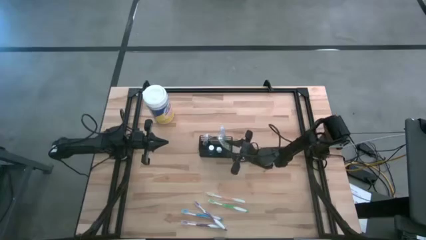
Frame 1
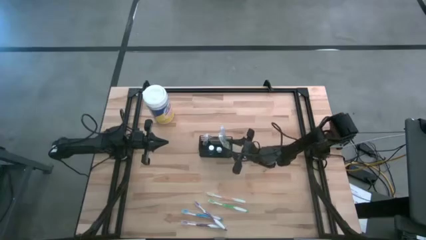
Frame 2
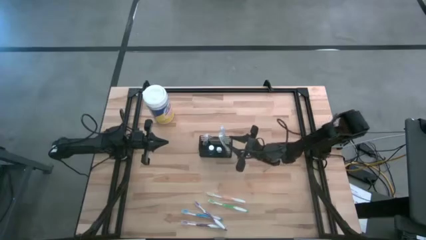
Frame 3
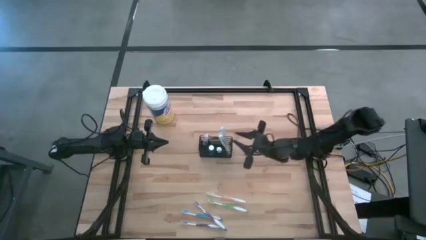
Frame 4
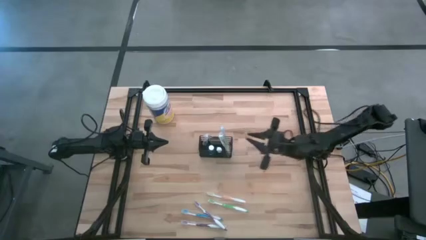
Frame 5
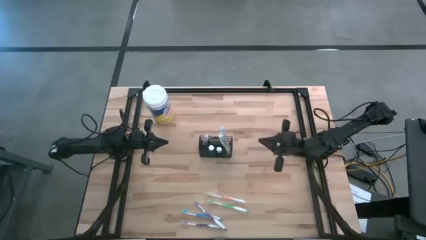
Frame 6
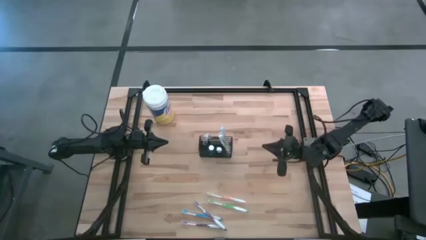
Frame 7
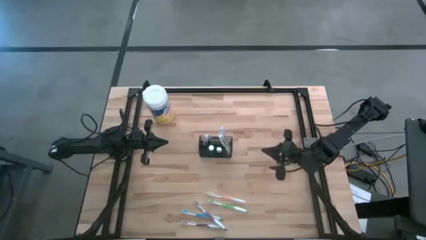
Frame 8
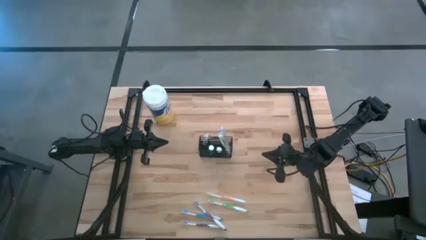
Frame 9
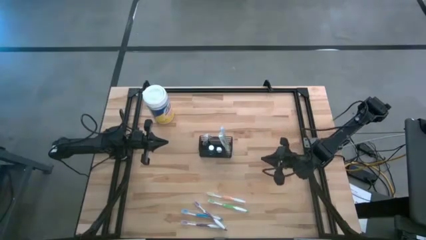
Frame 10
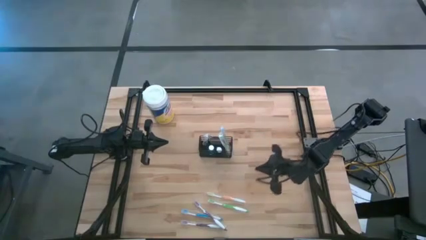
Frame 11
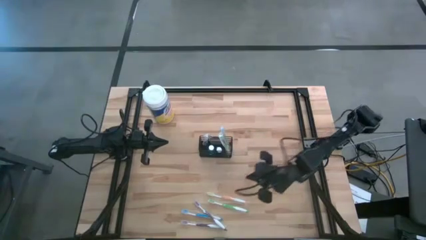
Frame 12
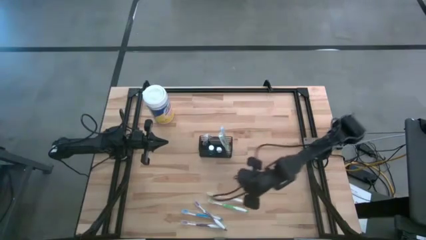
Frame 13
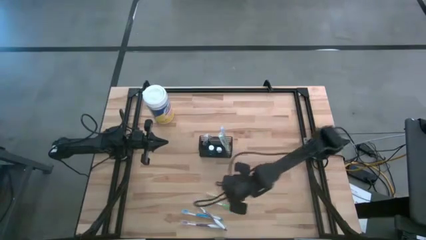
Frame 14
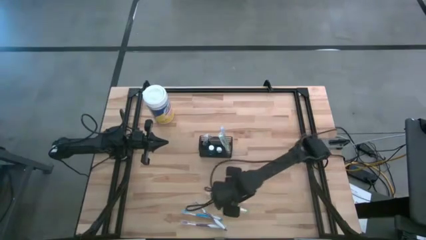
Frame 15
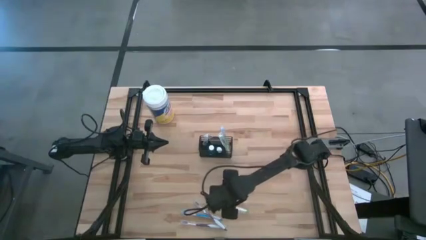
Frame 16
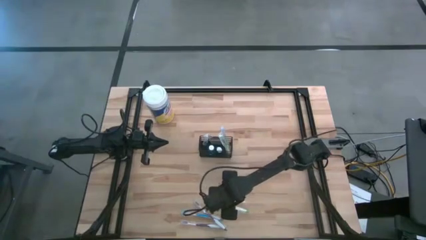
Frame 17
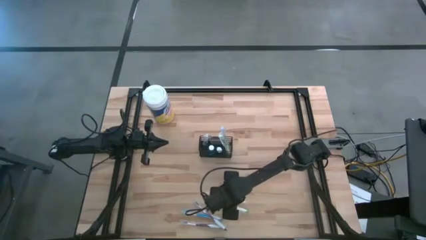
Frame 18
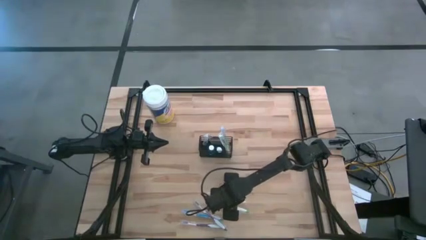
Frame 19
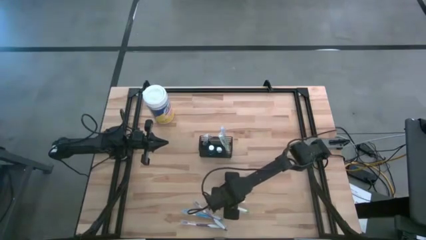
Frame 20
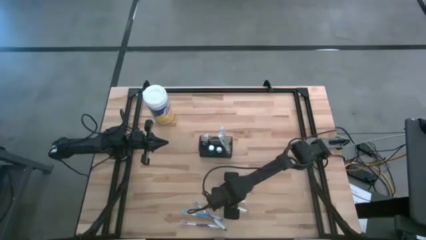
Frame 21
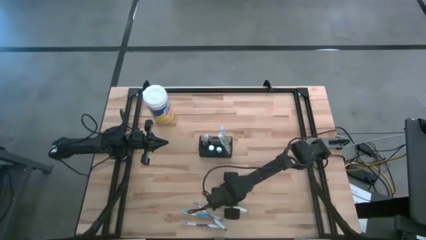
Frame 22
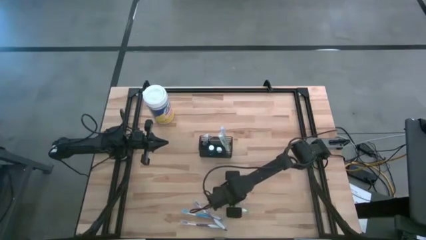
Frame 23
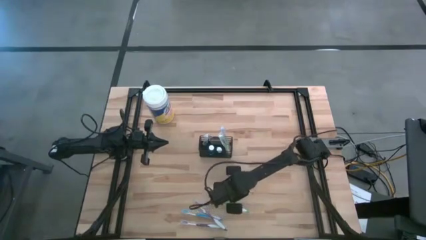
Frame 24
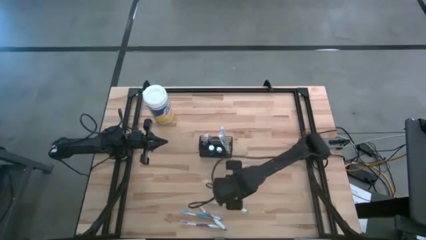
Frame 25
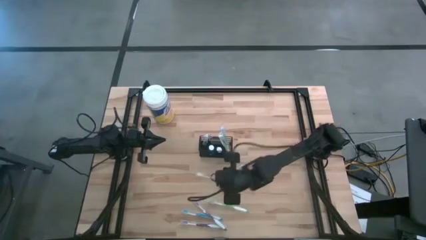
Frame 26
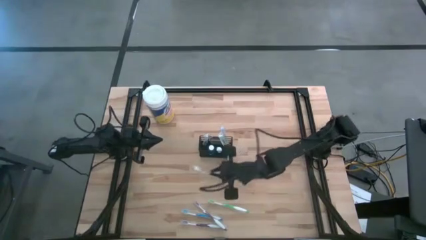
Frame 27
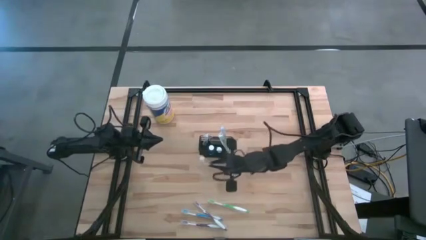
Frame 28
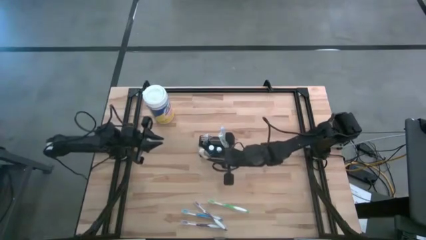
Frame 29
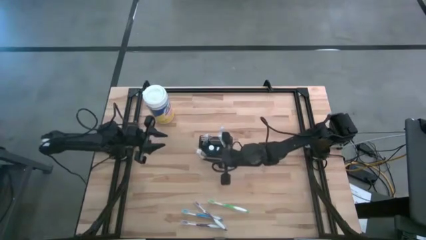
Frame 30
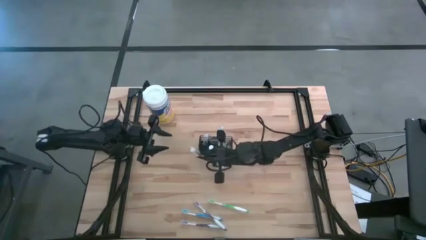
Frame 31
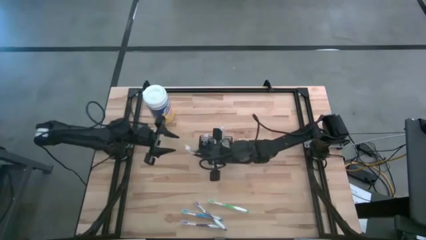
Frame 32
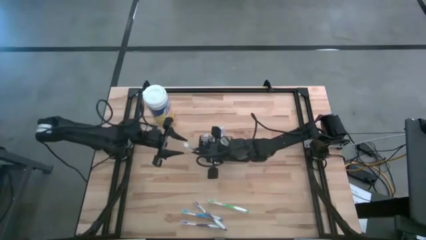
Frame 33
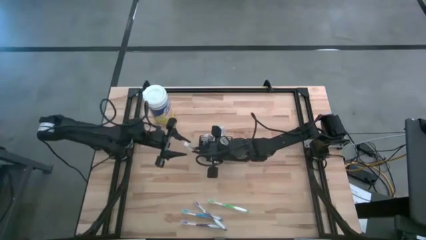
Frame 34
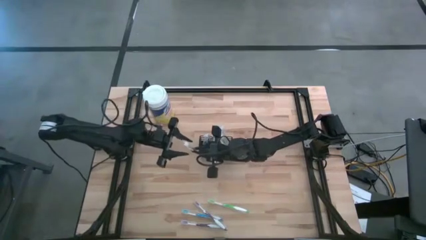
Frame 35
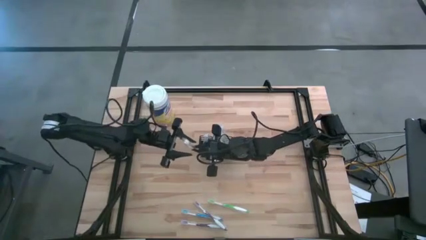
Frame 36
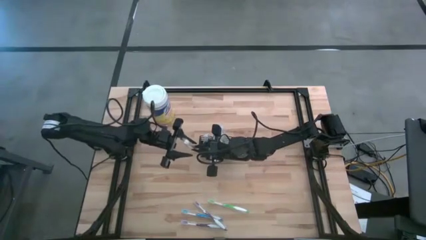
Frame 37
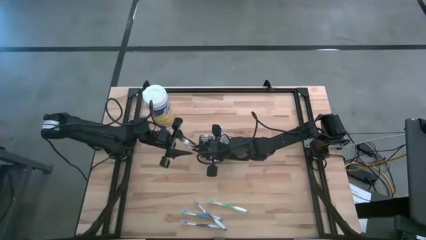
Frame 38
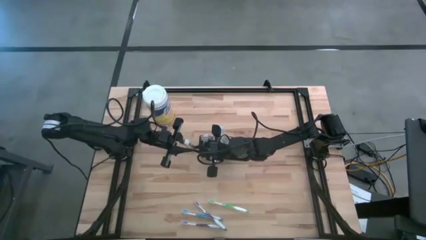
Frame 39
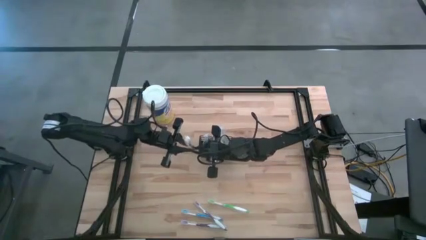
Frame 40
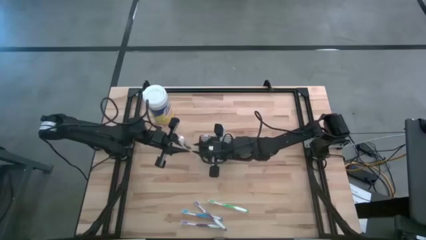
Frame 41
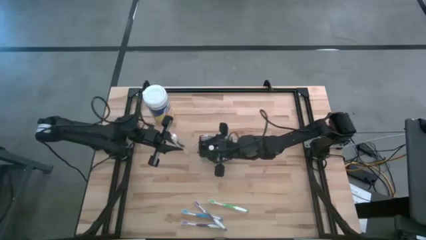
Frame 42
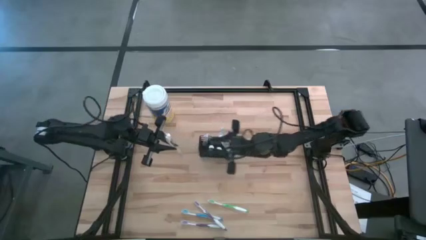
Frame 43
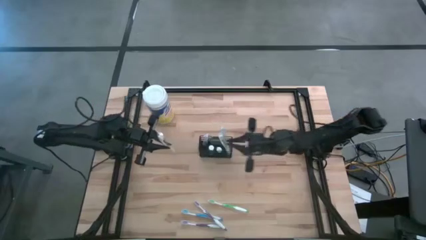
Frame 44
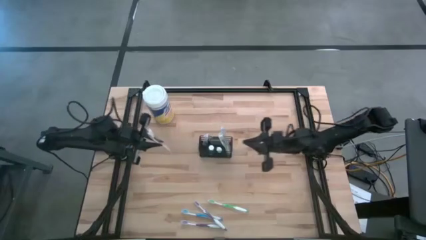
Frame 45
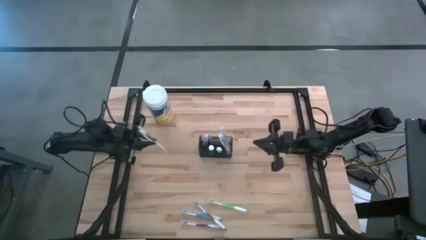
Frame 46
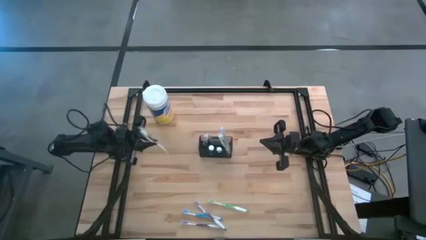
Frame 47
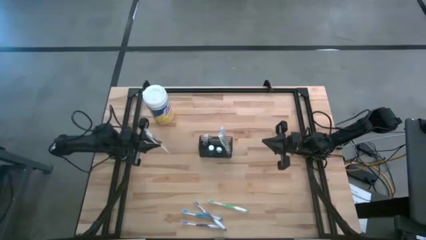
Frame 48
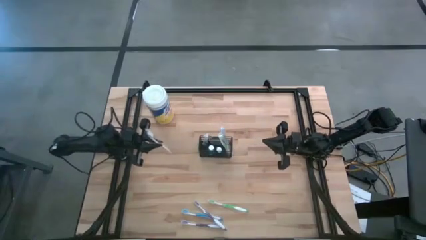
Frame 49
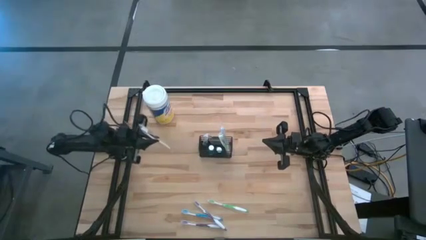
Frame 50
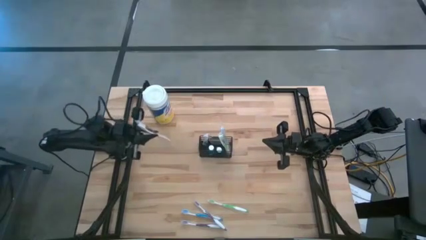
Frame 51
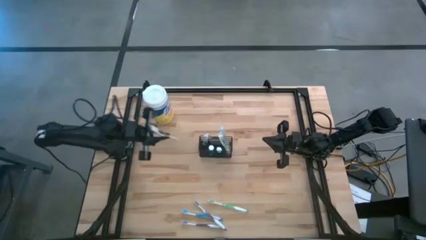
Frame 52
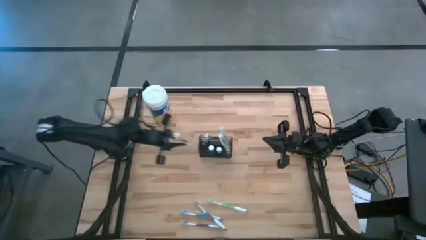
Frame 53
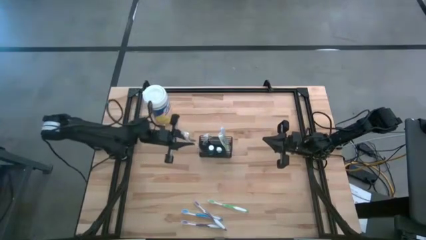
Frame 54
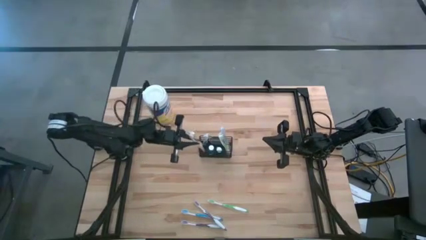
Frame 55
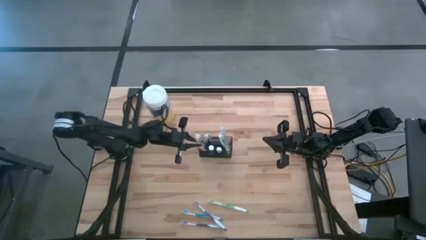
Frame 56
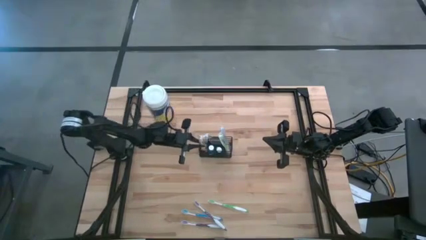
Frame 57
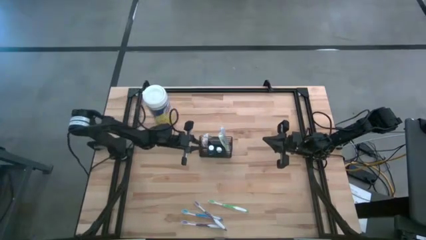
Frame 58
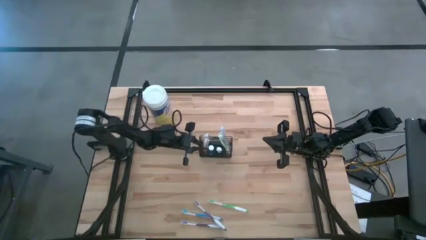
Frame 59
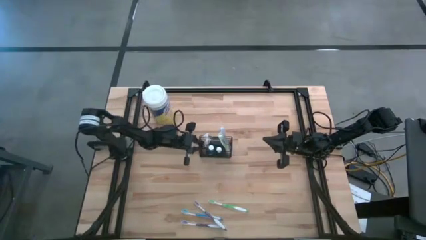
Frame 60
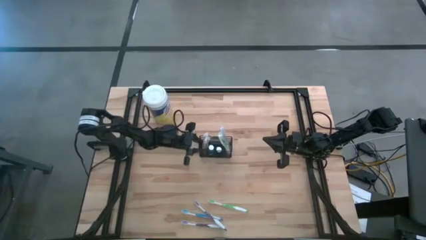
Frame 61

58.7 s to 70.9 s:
Task: Pick & Place toothbrushing station
Put the orange toothbrush into the wire organizer

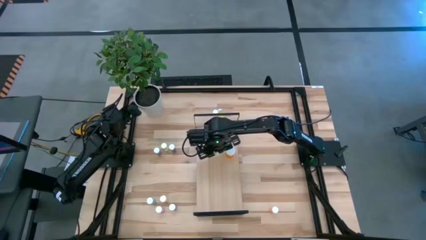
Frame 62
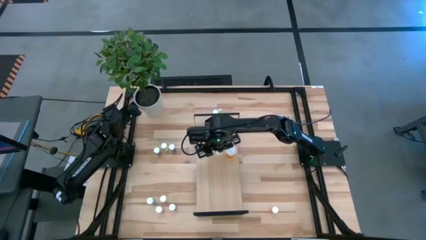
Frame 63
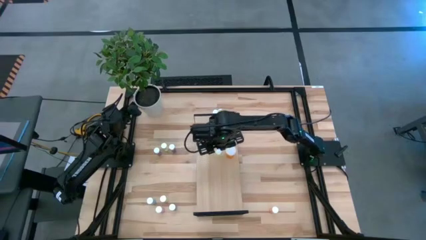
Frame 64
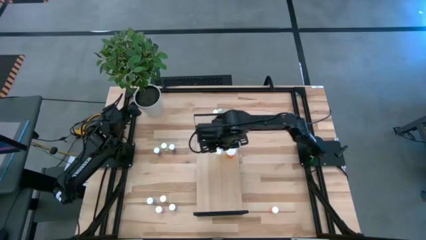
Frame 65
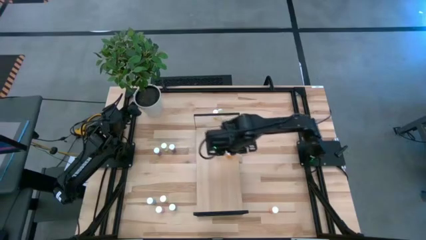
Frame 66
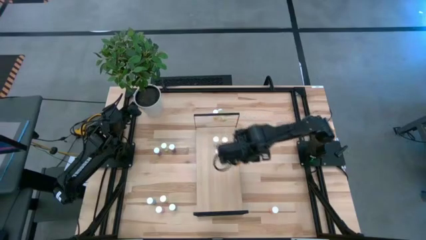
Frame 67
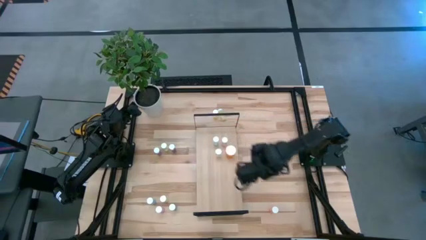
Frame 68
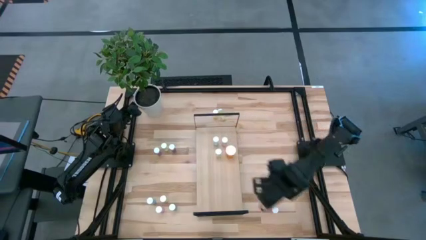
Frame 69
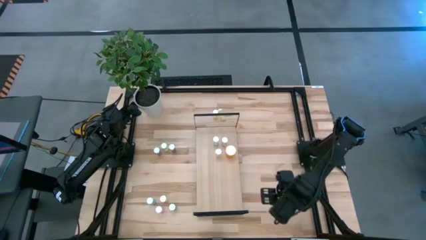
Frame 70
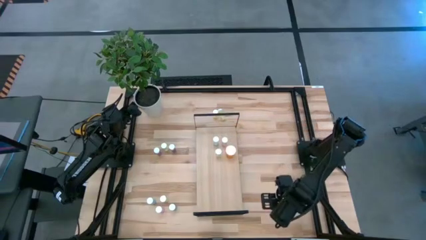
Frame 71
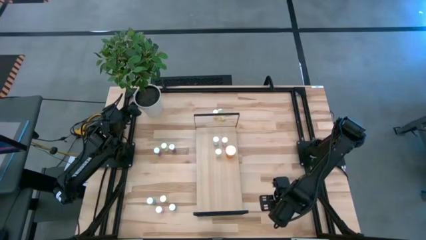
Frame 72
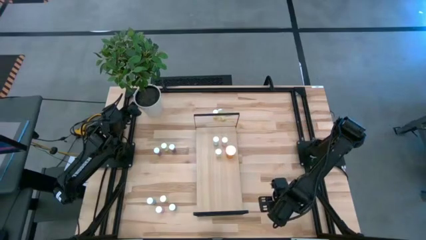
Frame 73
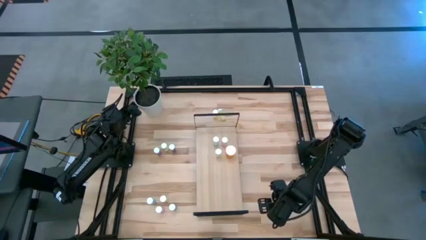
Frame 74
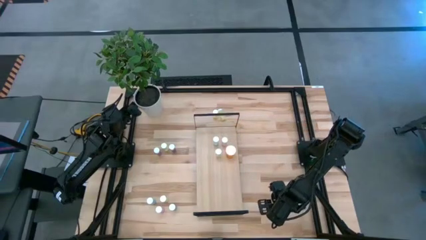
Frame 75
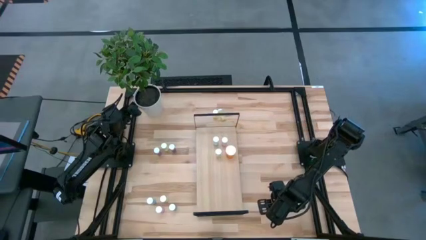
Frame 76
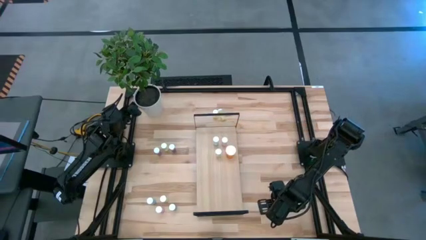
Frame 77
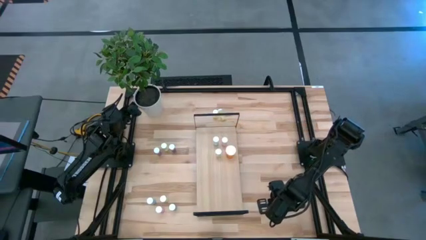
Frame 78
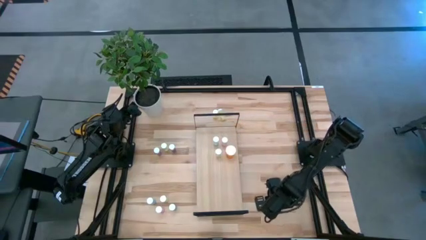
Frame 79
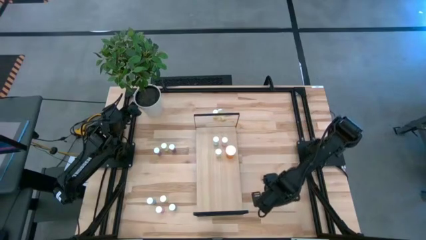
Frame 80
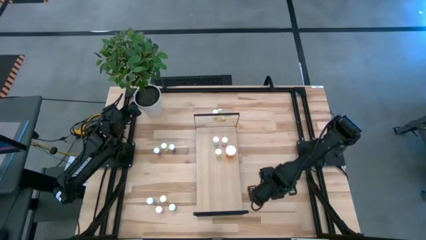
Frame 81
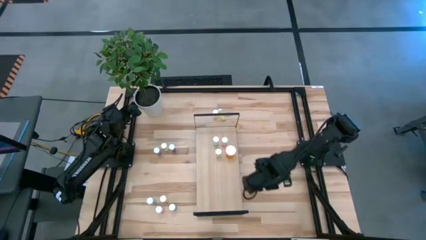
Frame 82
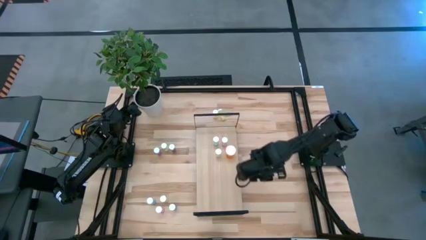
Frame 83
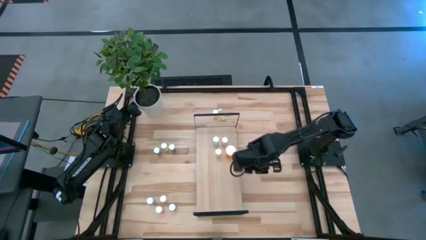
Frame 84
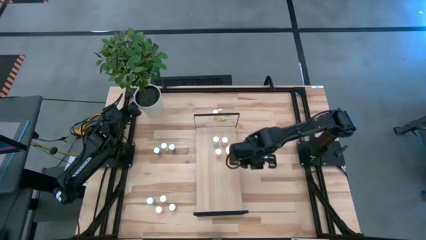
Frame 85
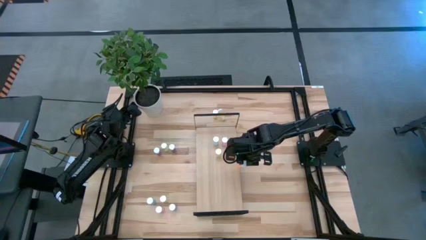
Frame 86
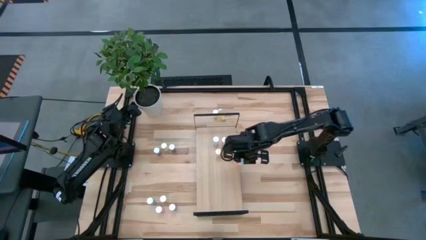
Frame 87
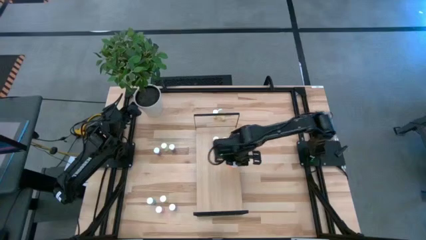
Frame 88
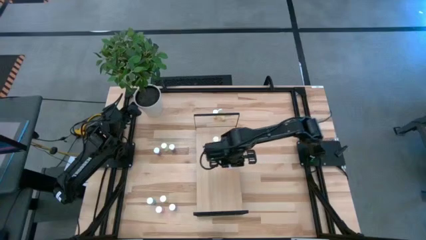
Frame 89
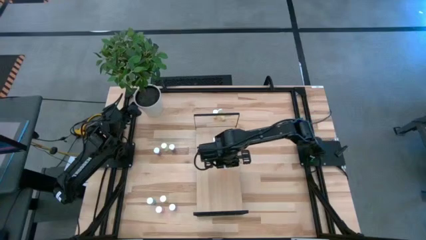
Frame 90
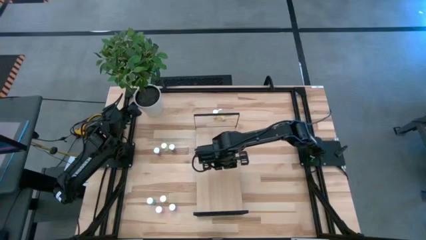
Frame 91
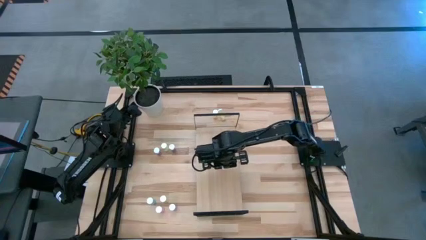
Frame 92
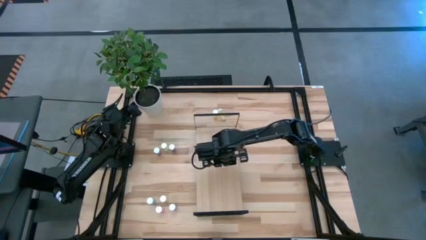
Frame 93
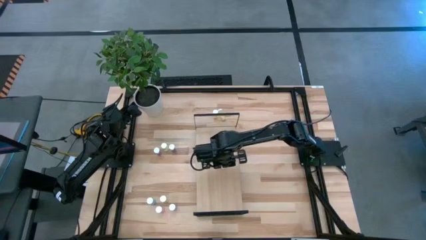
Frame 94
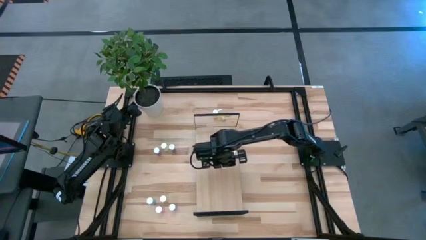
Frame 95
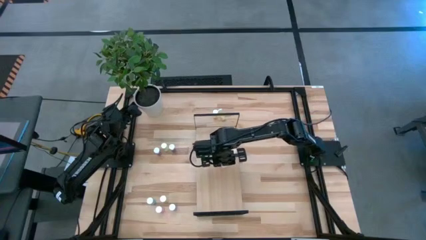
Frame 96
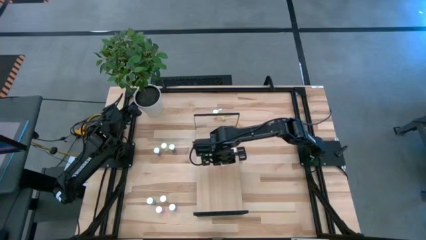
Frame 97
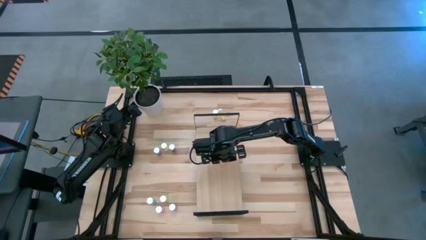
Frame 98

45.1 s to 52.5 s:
Task: Pick and place medicine bottles onto shelf by color
Put the red pill bottle on the shelf
